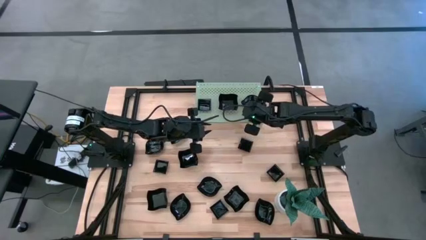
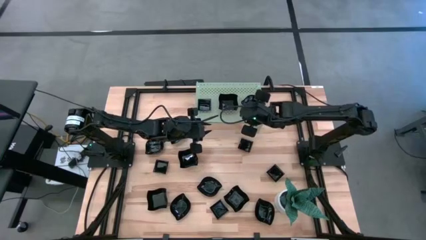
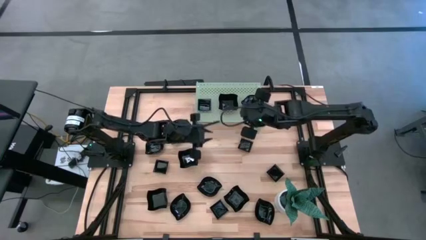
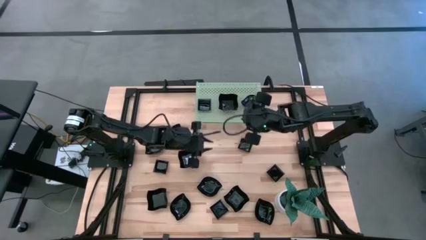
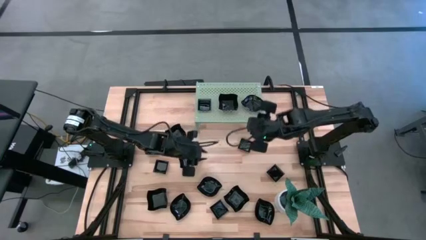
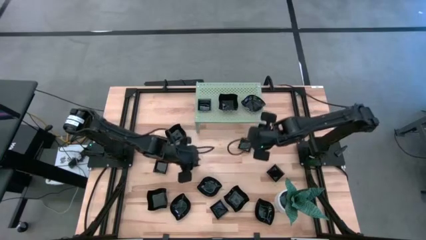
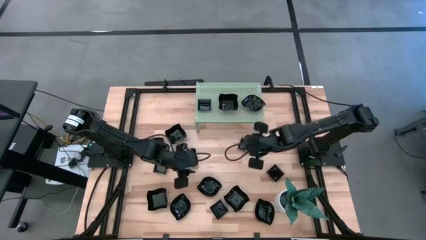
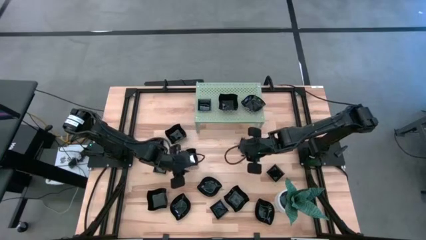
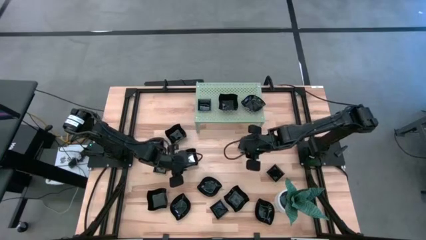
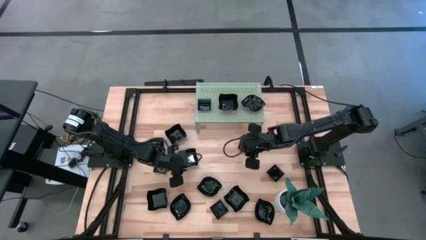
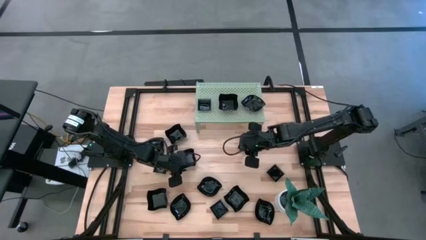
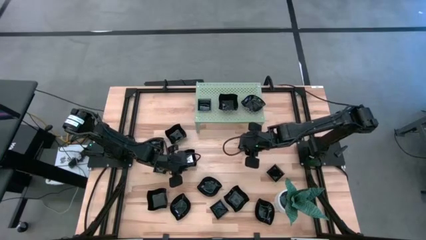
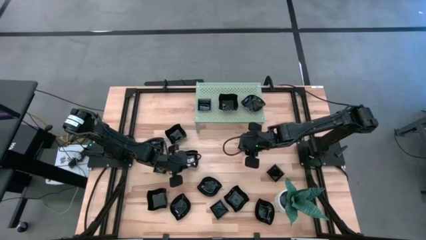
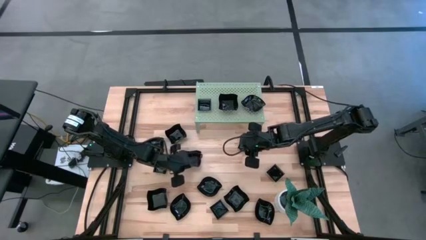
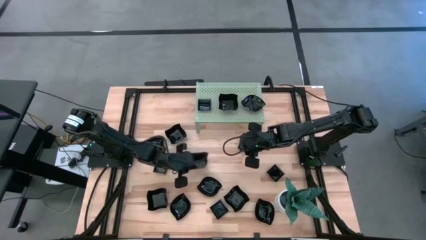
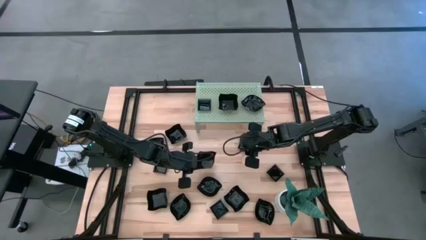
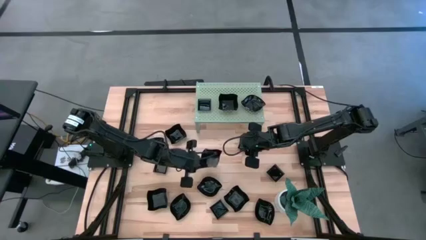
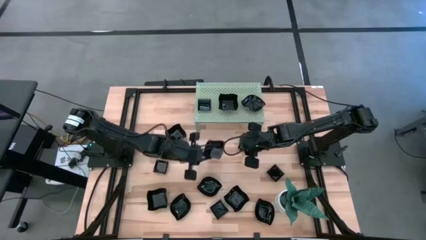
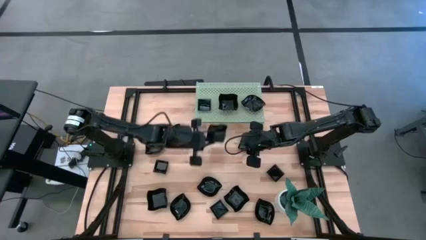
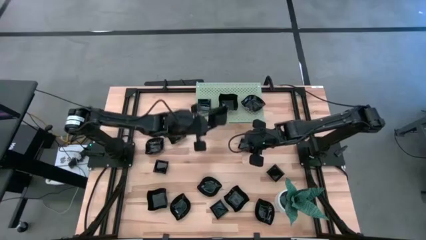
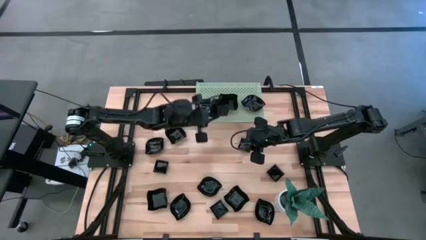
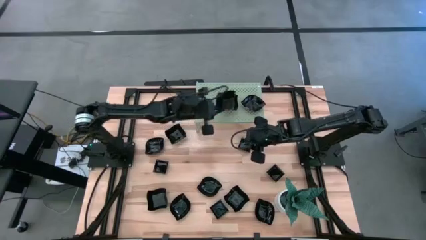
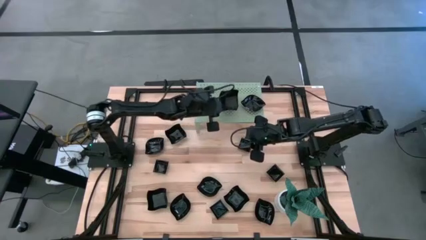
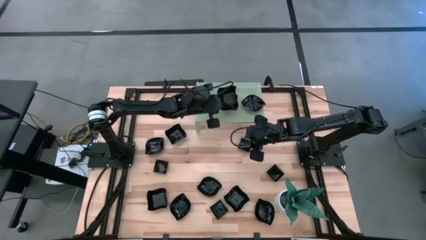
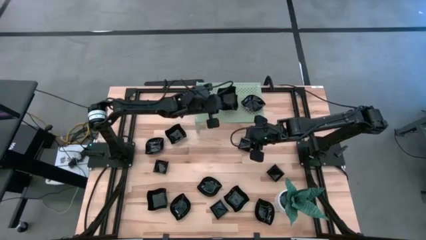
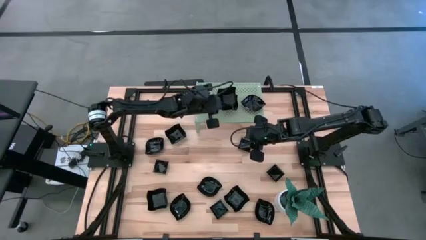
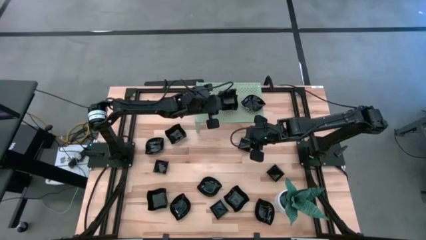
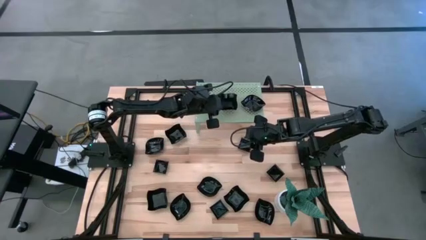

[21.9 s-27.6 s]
Task: Pick & Place Mini shaped plates
Stack the distorted plate on top of the other distorted plate on the shelf

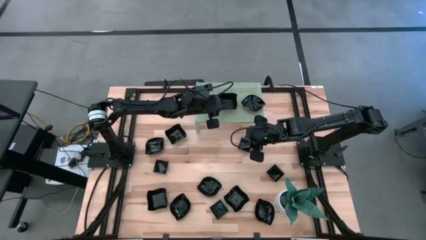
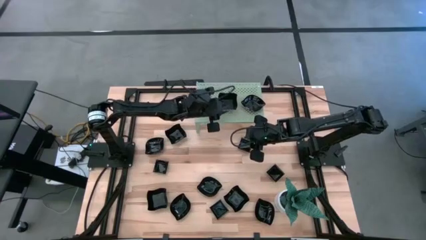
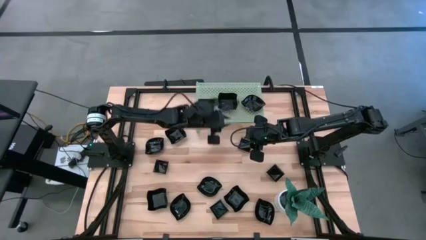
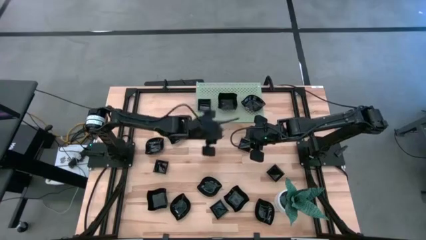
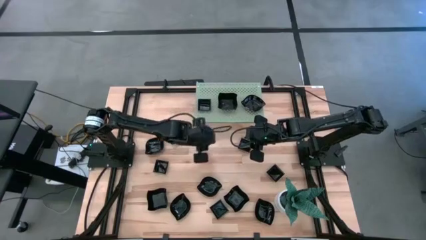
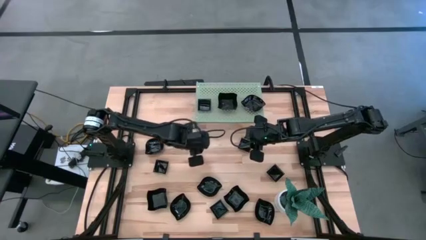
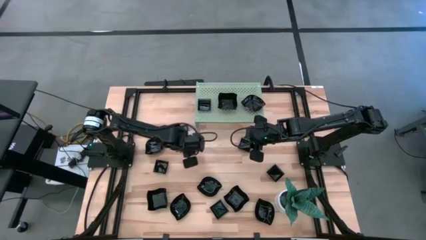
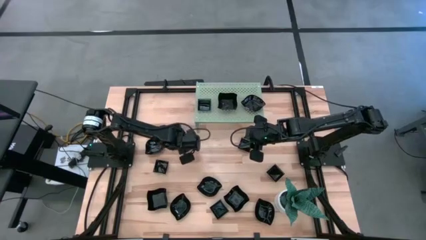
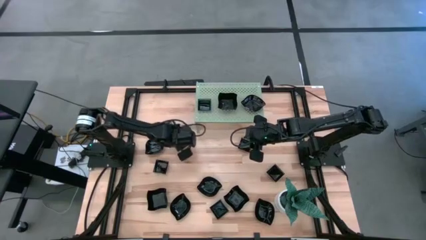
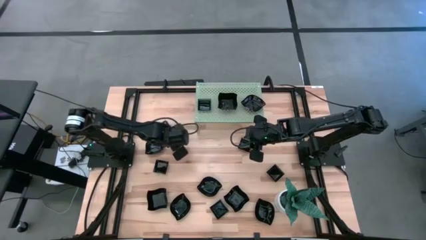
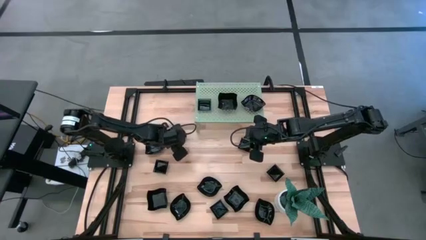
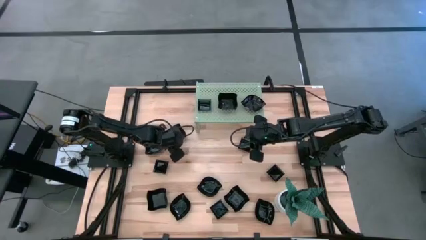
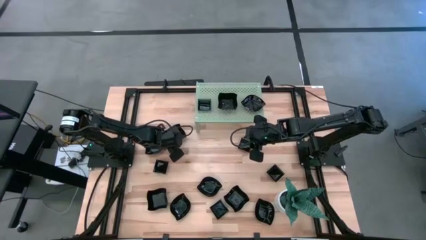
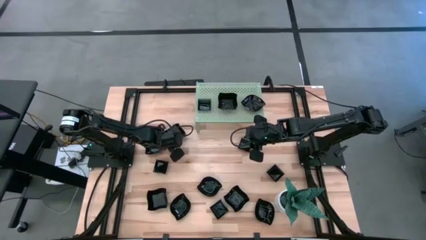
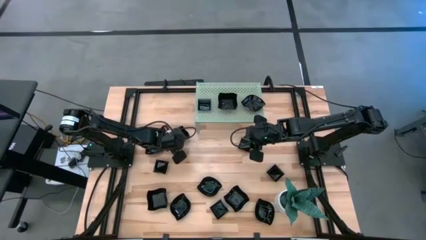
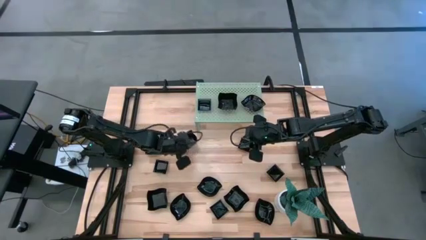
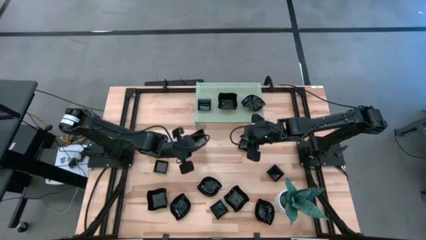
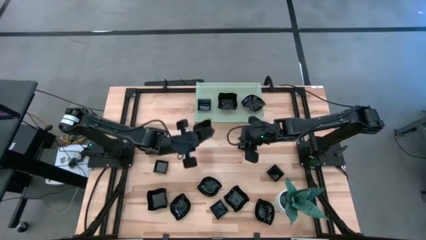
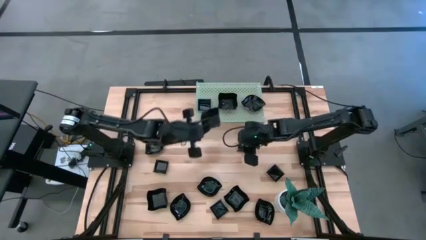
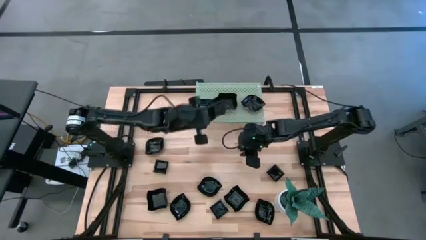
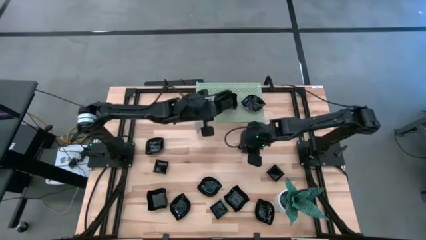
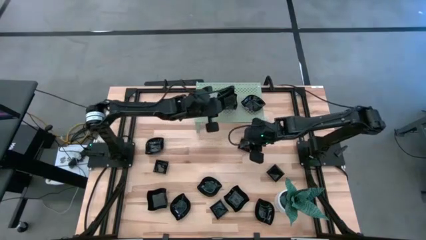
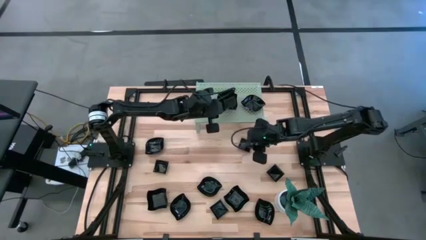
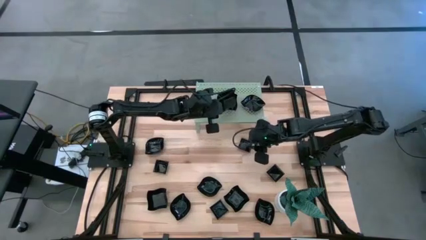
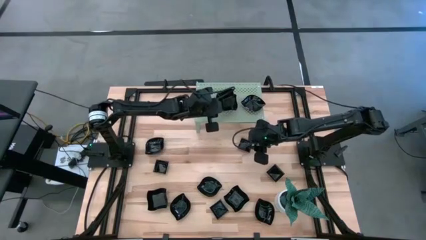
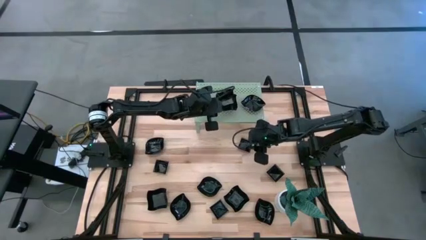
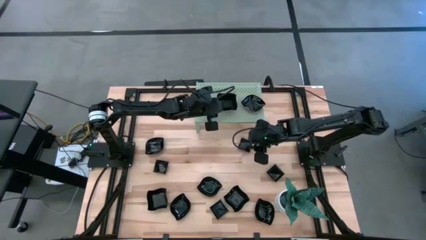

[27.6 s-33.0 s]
Stack the distorted plate on top of the other distorted plate on the shelf

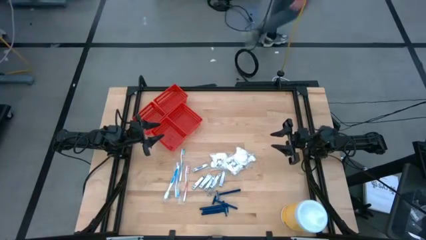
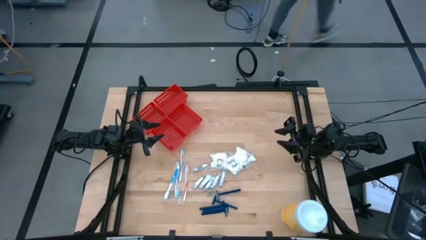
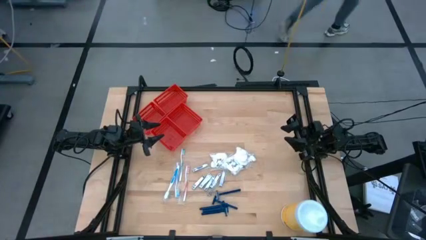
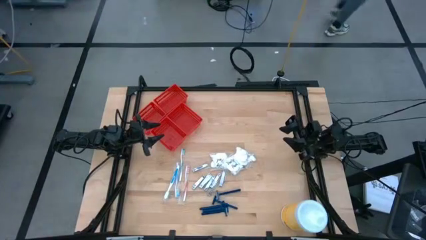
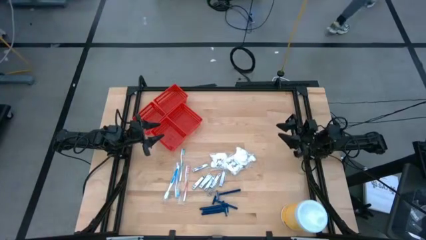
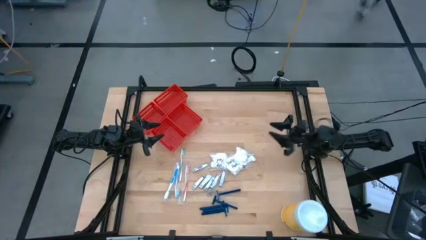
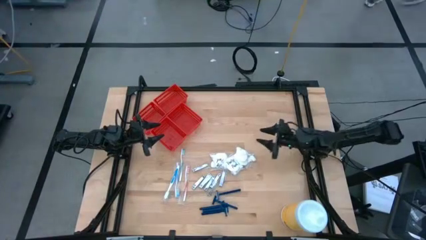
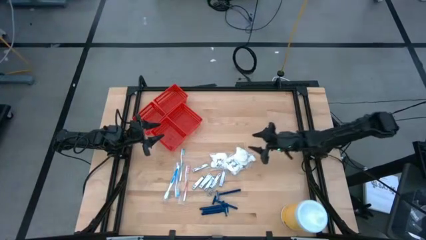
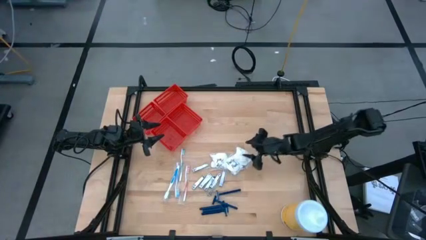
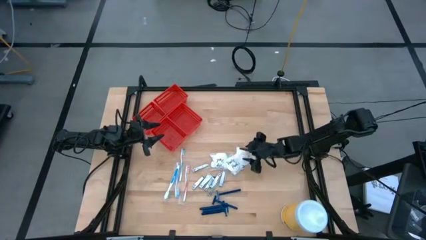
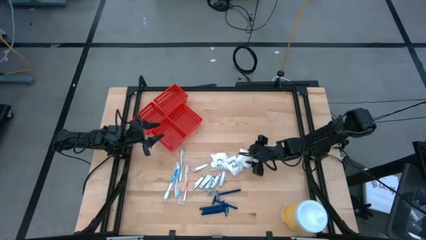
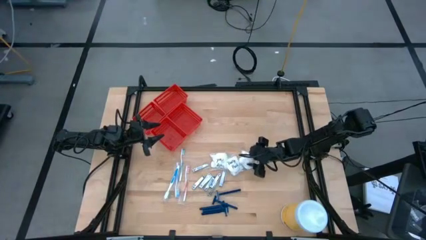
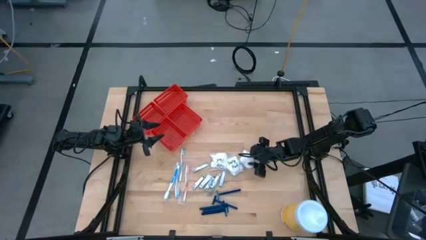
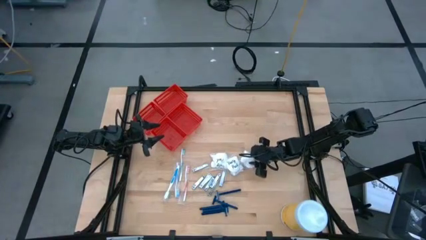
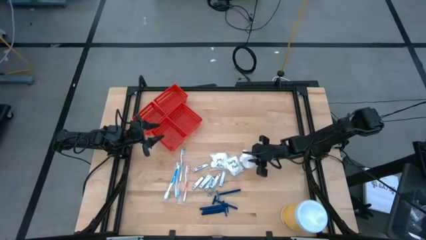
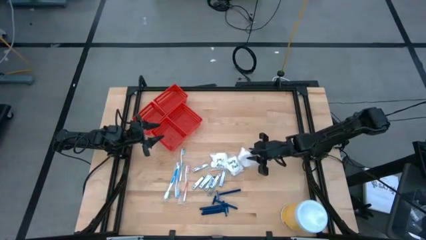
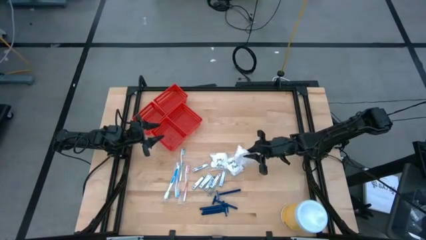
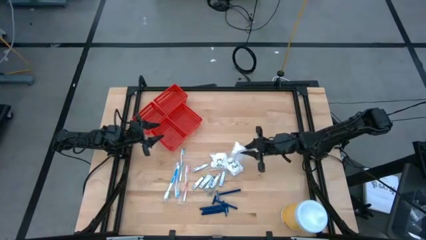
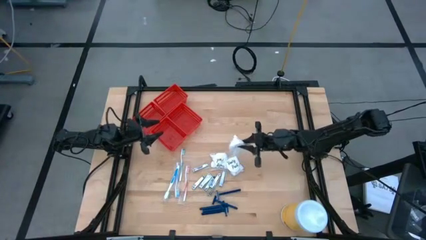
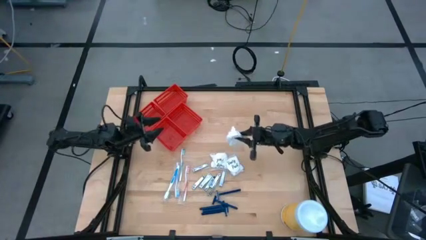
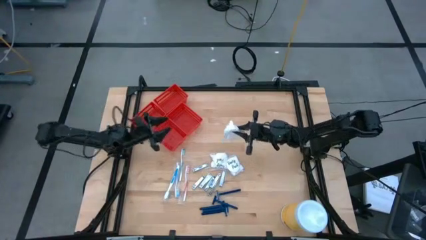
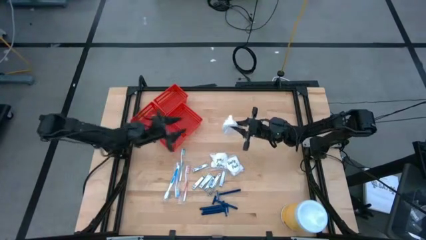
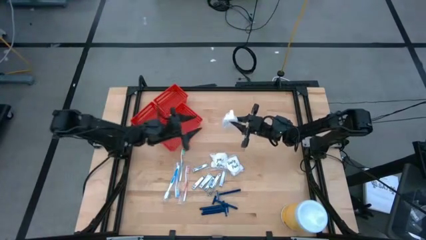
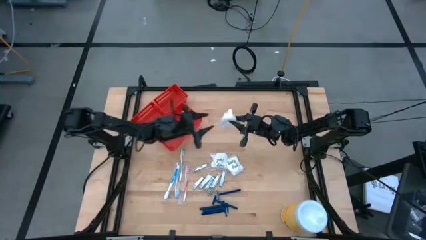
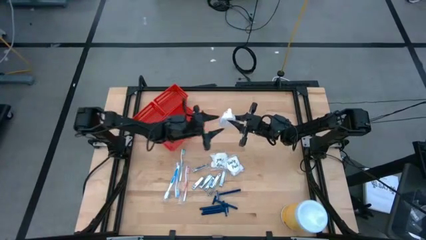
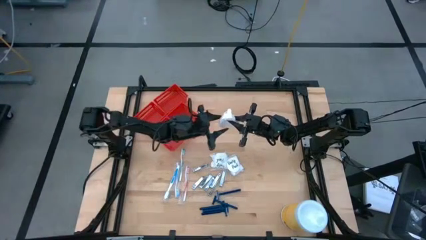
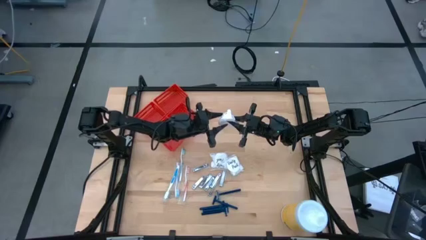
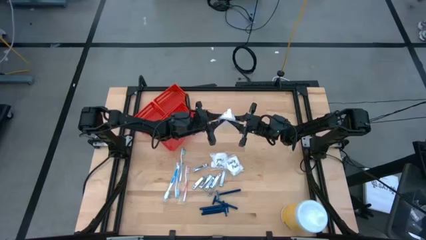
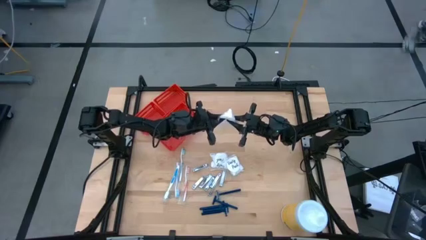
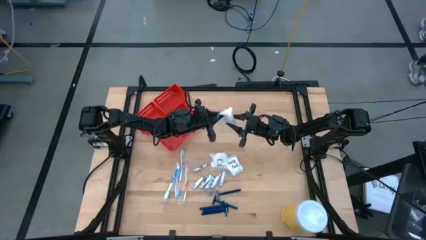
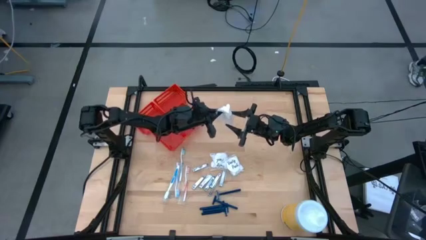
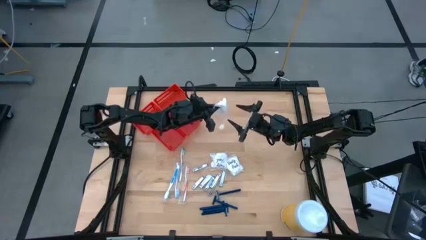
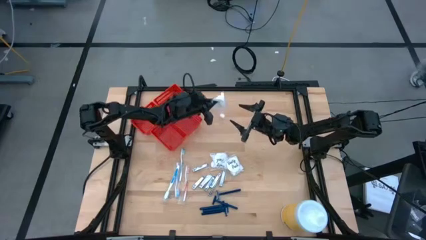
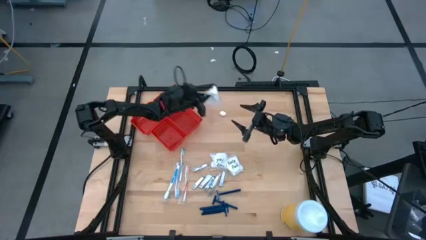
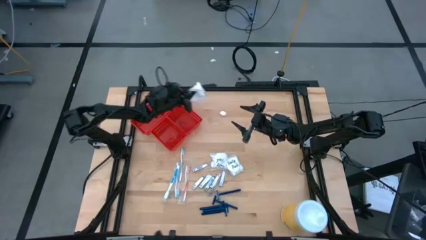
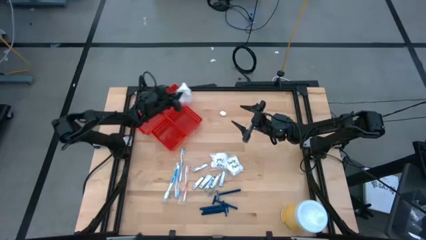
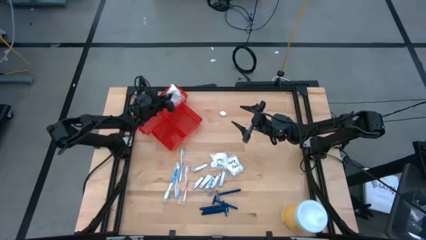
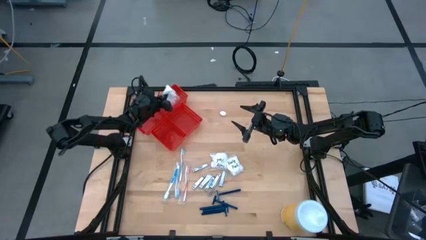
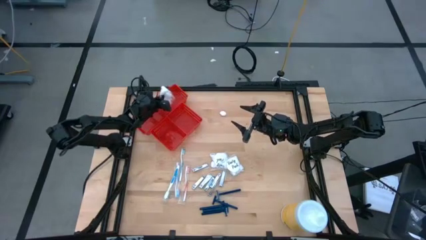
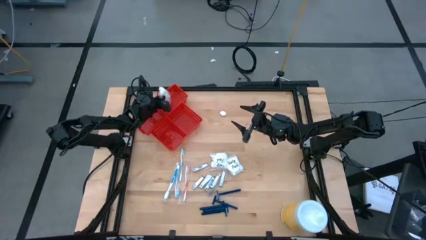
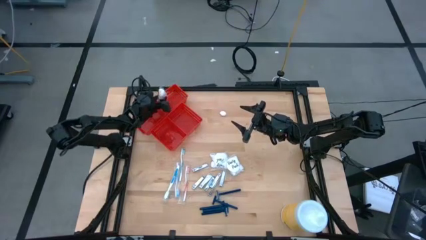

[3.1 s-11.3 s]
Task: Pick & Place Travel size toiletries
Put the right vanity pack into the horizontal right red bin
